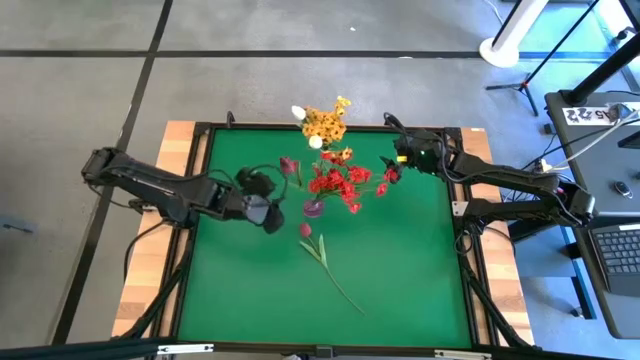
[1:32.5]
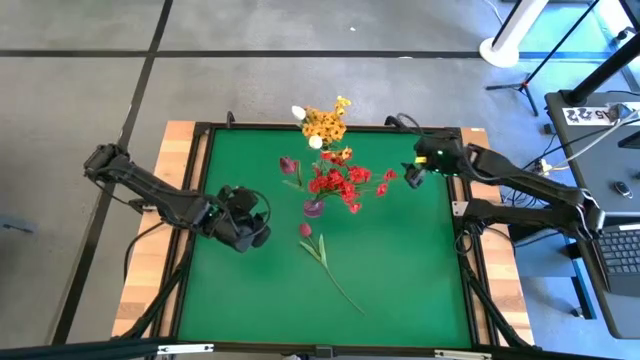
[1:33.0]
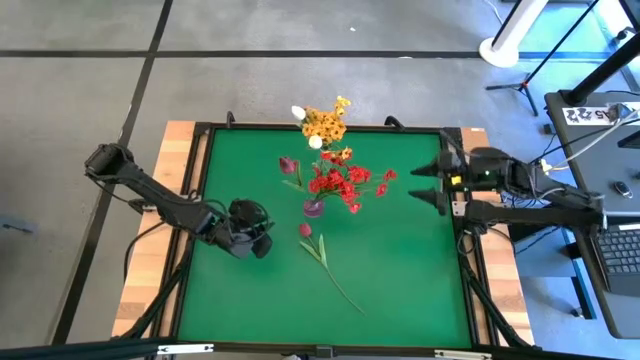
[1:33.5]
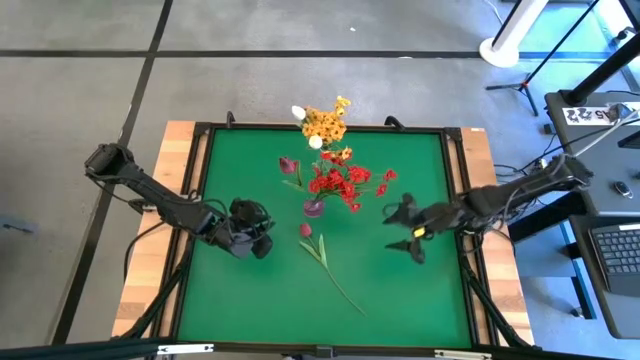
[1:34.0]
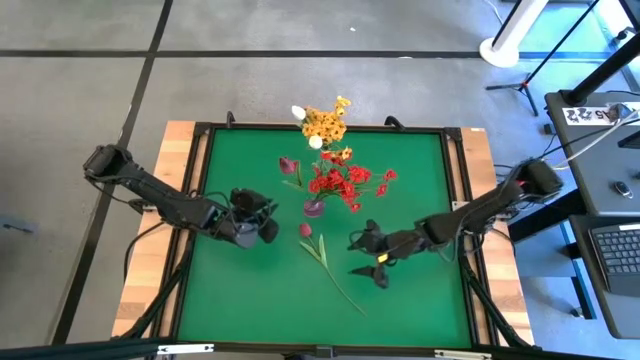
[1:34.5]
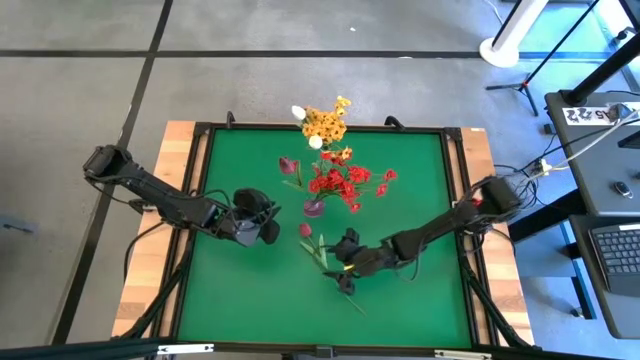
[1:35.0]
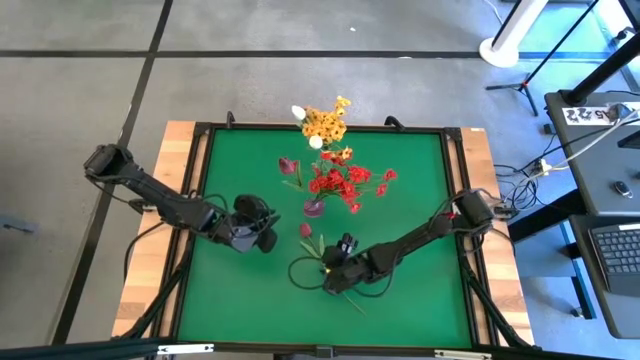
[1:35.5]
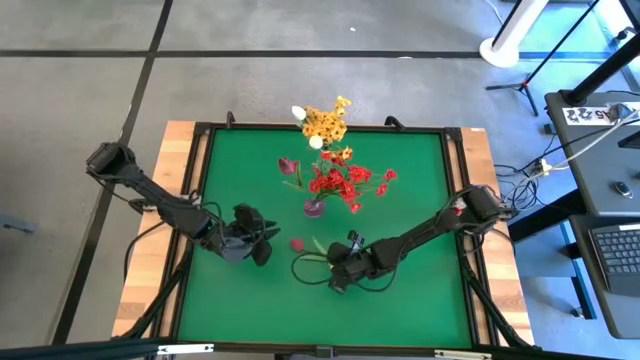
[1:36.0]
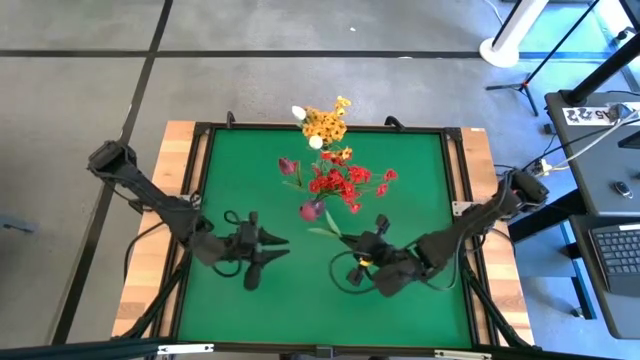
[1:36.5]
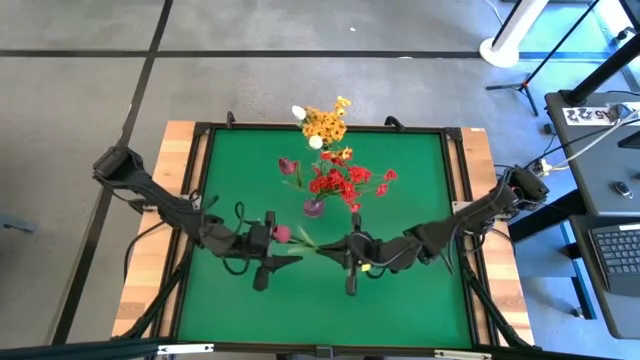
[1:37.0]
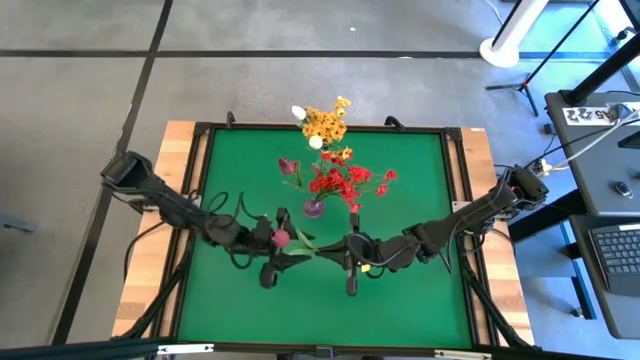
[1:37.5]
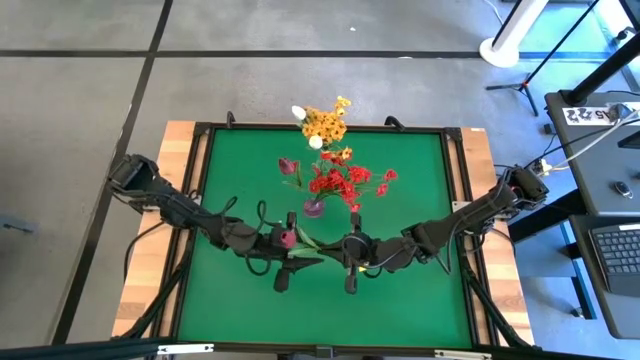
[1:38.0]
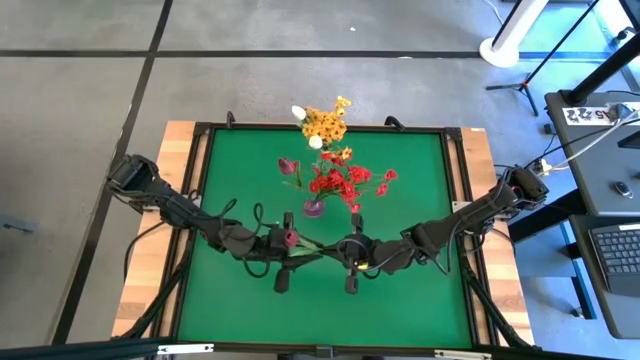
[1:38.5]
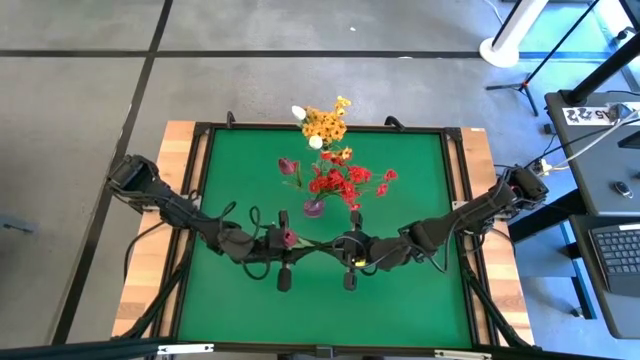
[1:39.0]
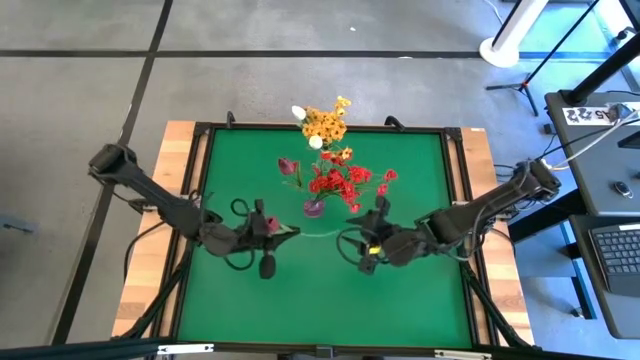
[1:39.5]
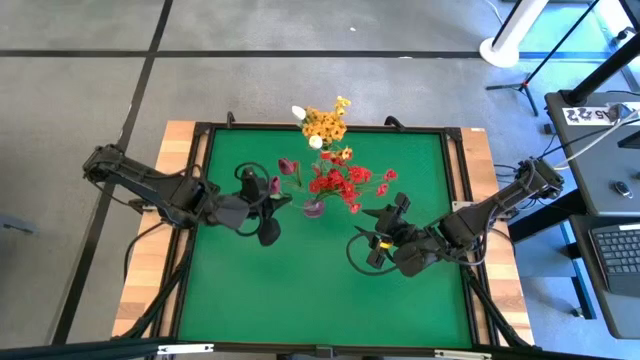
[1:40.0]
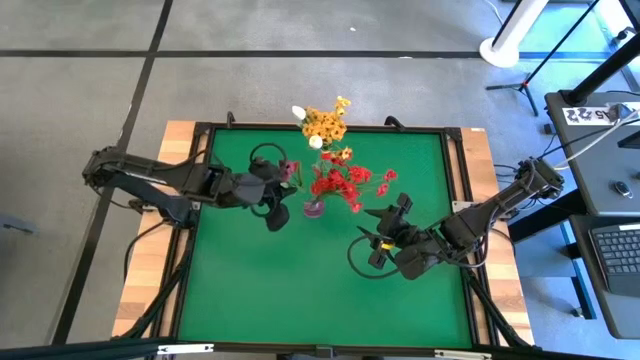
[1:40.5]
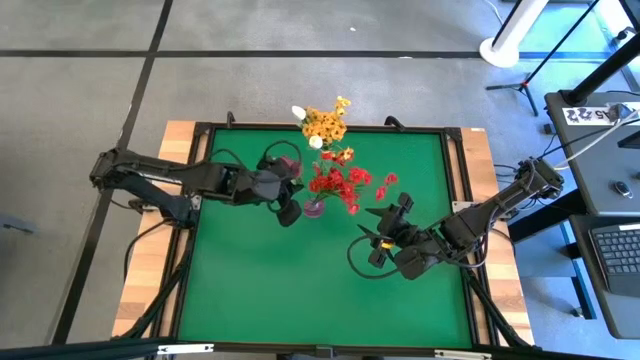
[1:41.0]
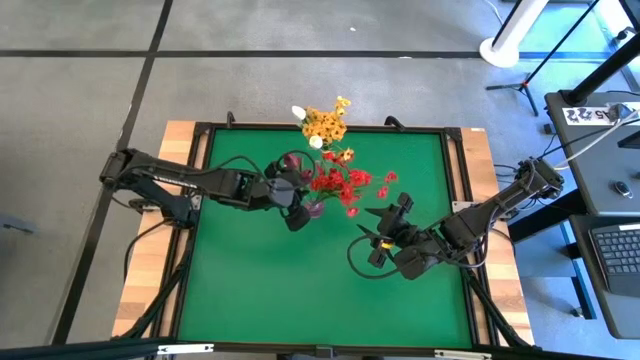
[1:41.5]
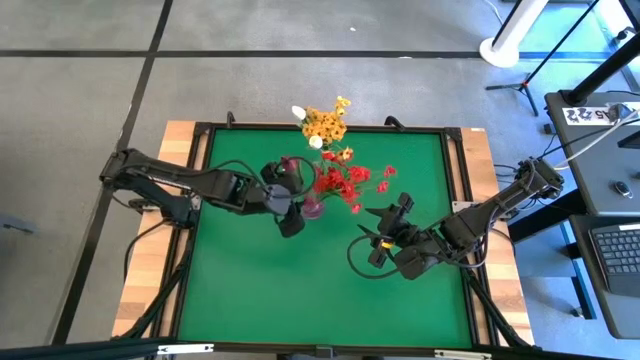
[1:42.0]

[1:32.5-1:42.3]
Task: Sort flowers into vase by color
Put the red tulip into the violet vase

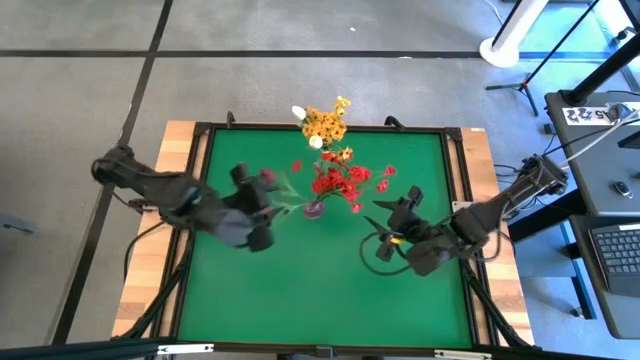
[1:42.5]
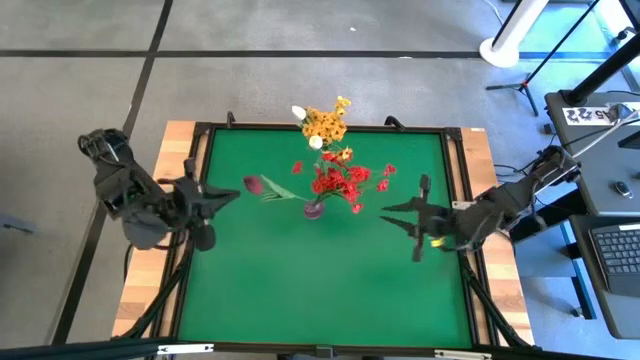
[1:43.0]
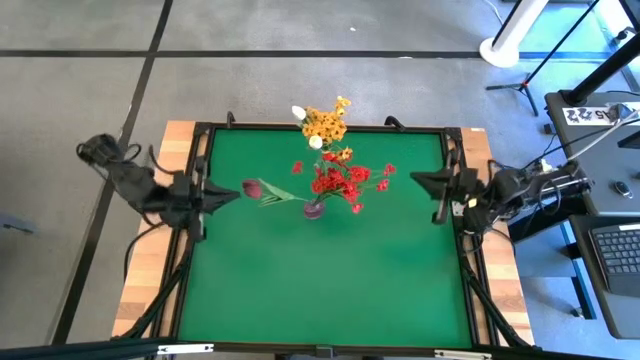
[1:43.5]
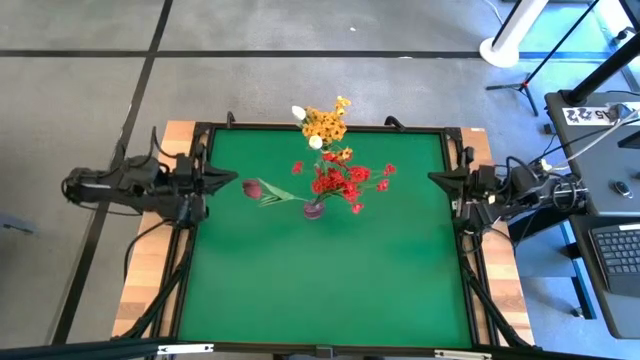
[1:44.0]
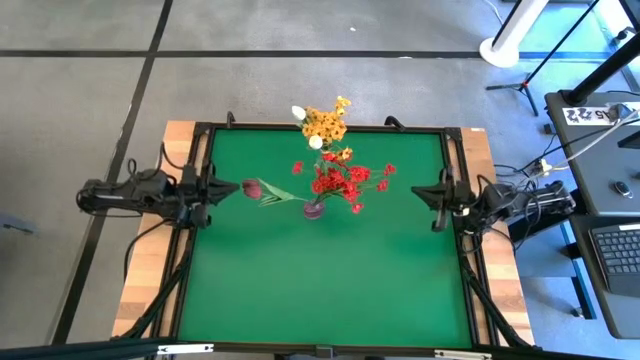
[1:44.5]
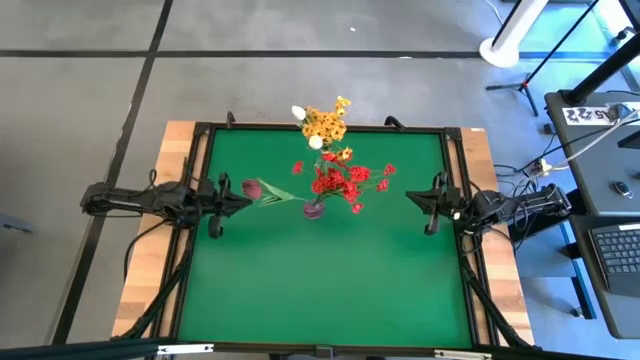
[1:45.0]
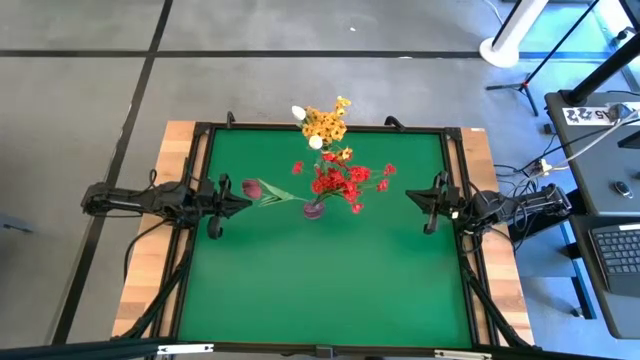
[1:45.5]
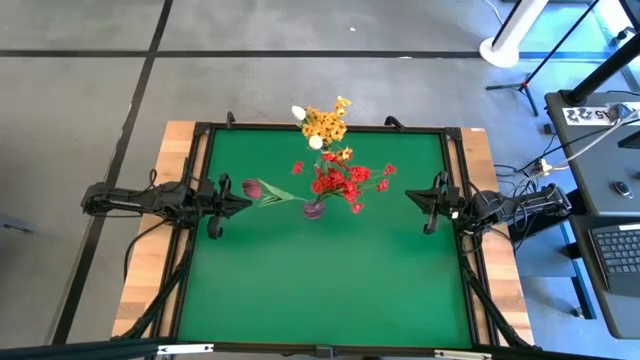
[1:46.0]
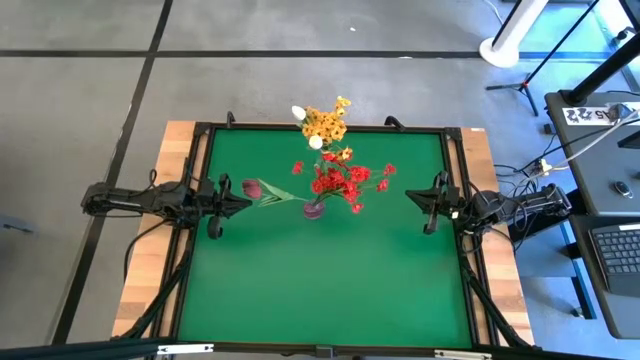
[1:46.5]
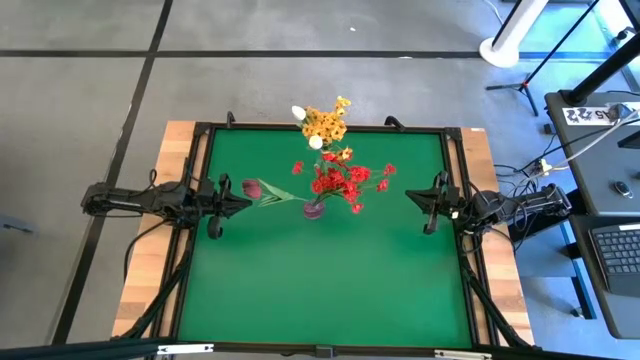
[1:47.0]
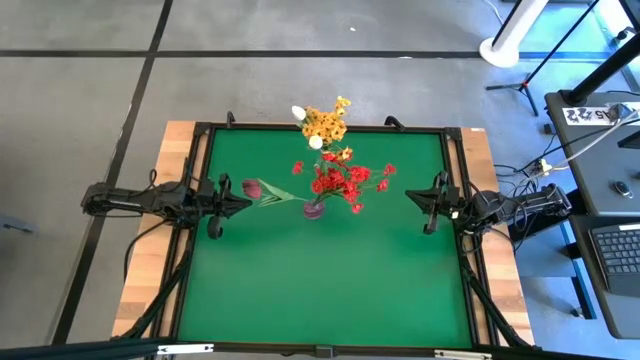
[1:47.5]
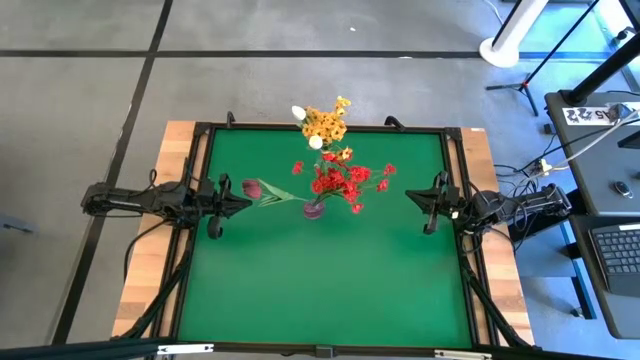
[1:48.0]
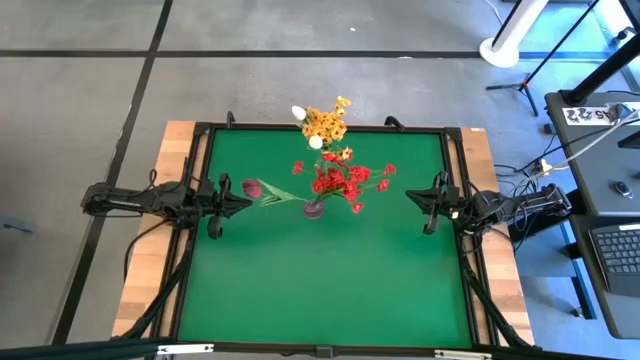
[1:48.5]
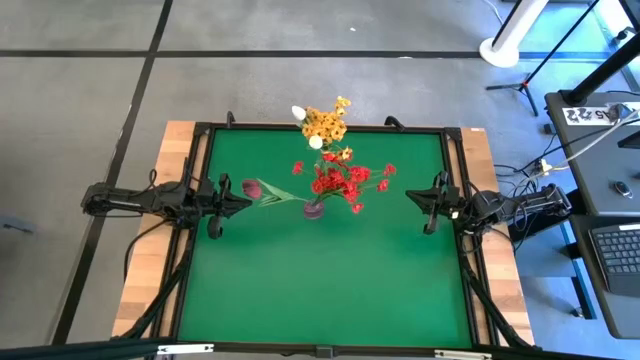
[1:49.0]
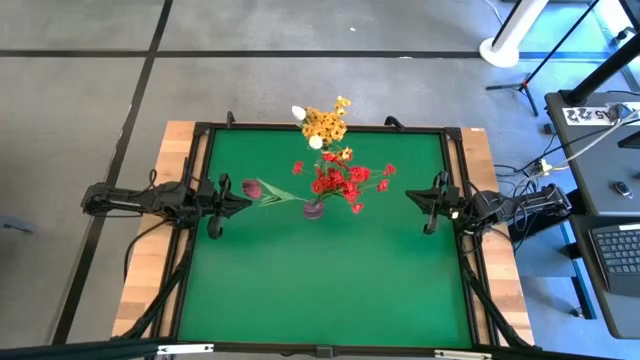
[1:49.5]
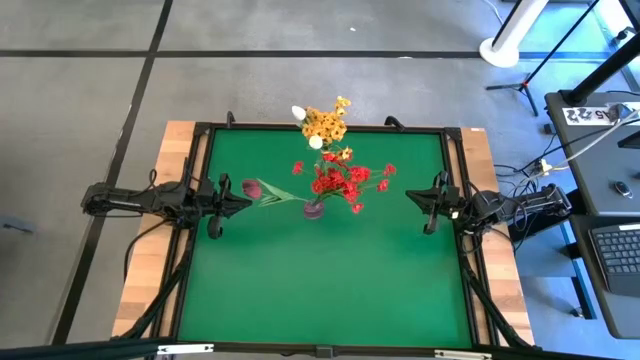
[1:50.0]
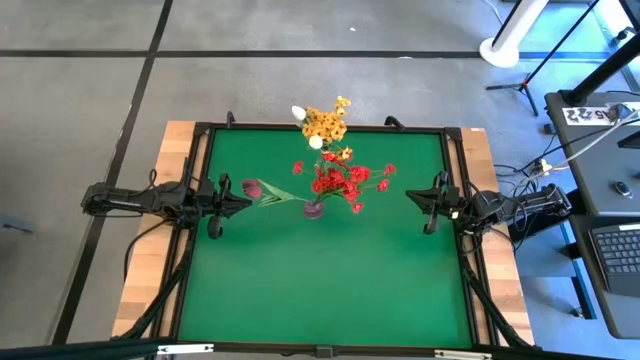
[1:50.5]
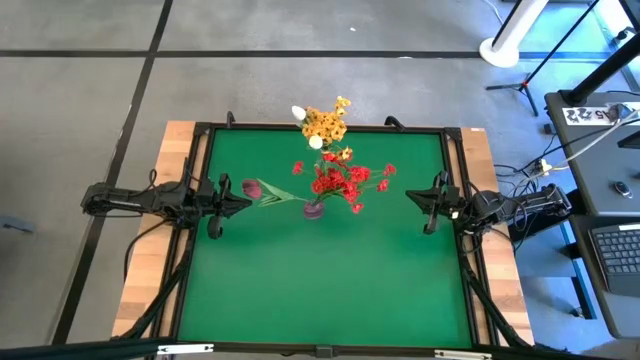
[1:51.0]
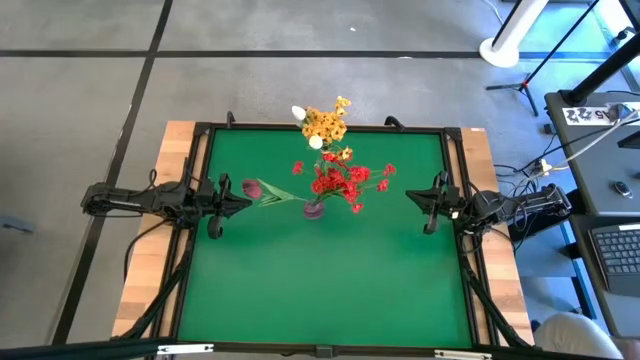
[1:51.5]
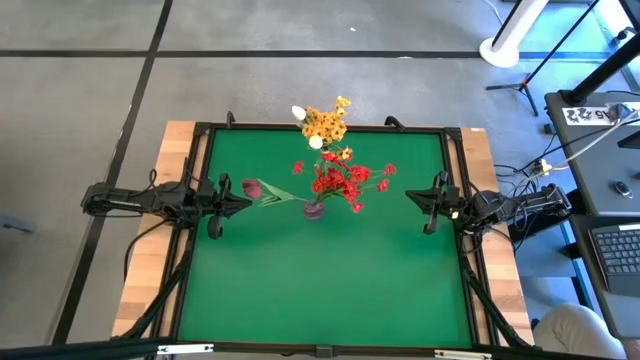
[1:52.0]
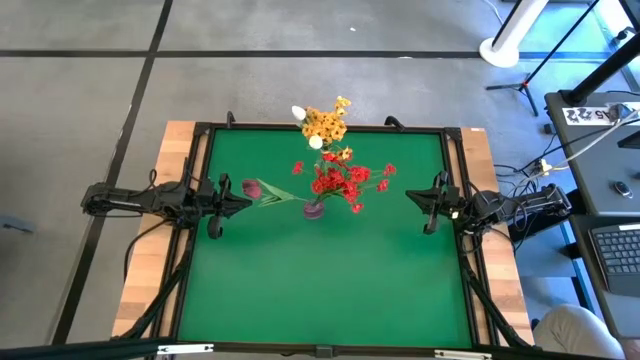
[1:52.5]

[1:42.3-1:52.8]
Return to Home Position

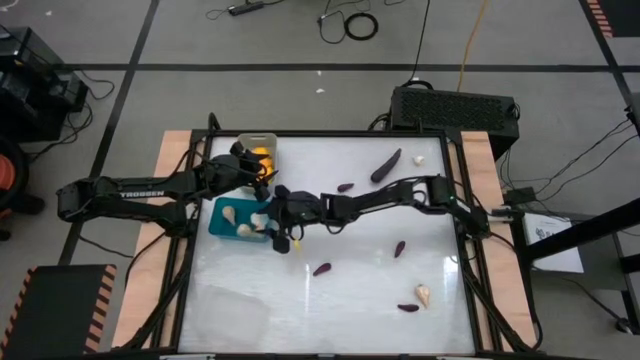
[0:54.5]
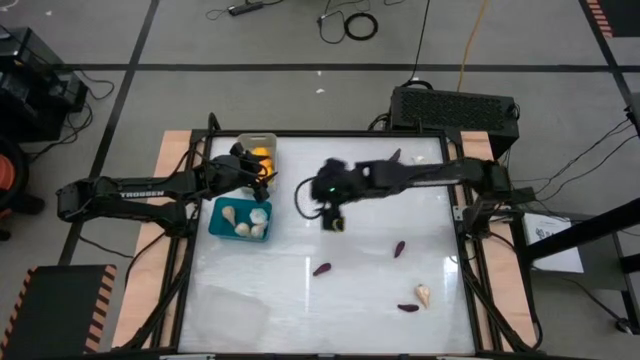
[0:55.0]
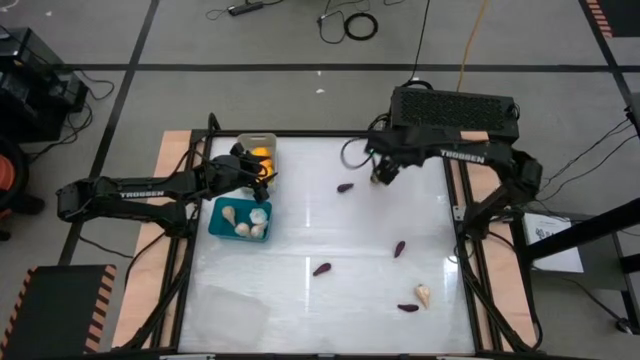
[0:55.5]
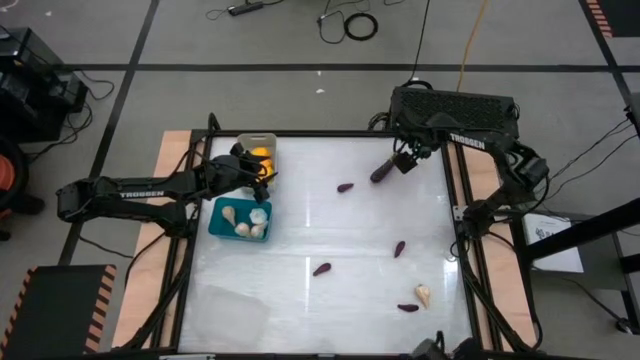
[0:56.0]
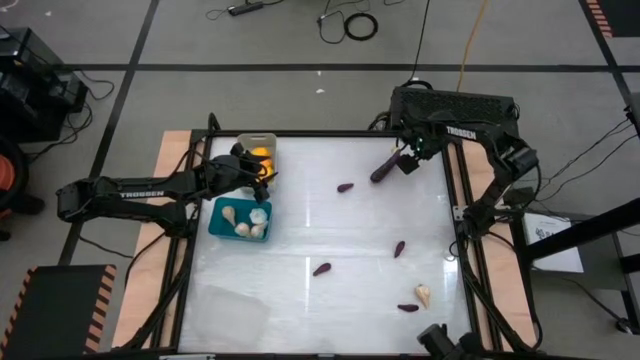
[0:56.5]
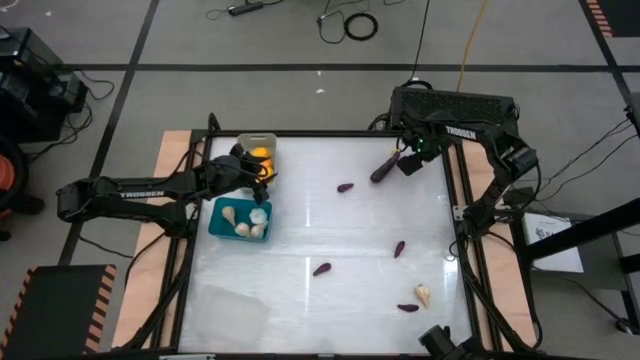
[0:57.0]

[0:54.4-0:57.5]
Task: Sort produce into baskets
Put the white garlic into the blue bin
